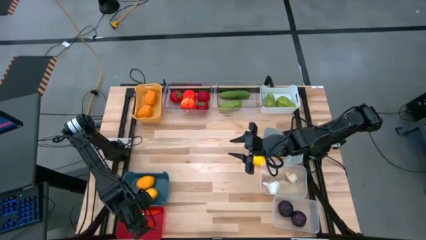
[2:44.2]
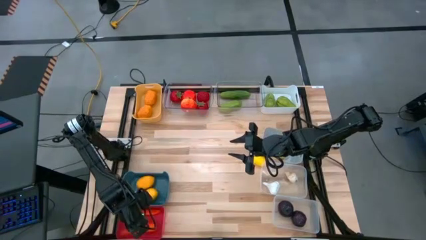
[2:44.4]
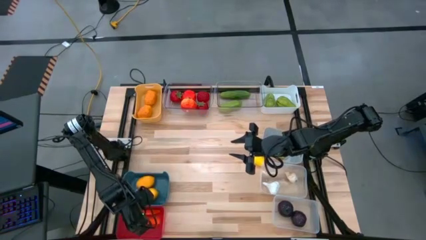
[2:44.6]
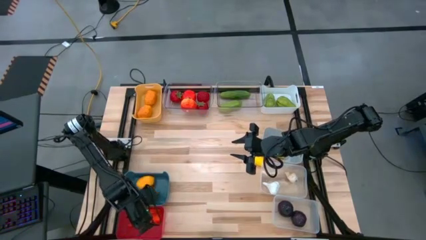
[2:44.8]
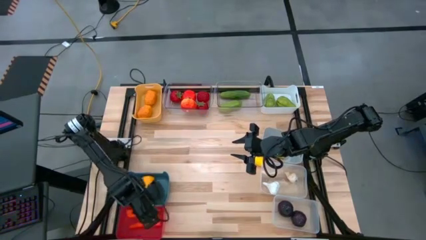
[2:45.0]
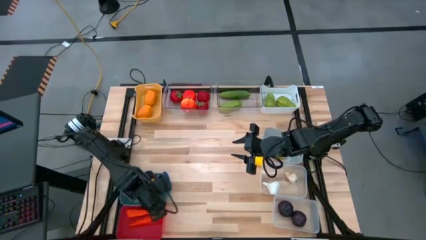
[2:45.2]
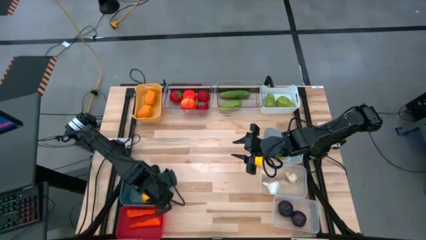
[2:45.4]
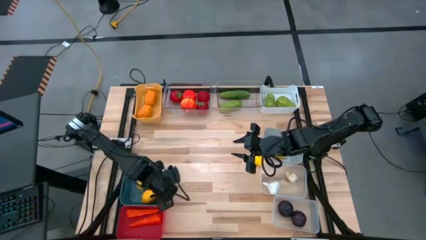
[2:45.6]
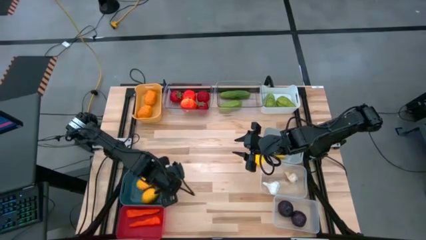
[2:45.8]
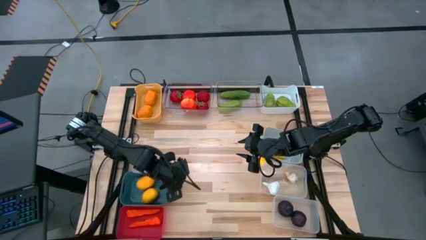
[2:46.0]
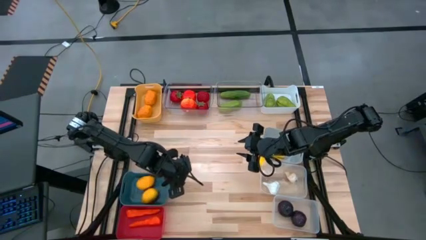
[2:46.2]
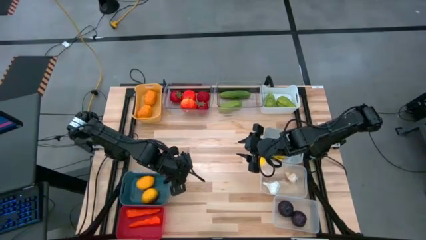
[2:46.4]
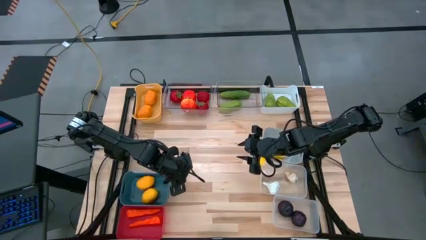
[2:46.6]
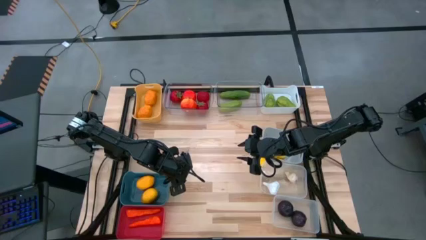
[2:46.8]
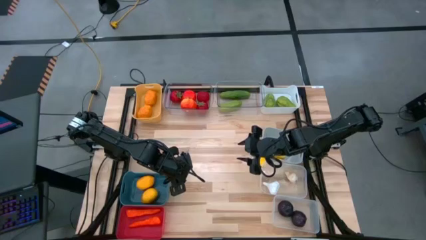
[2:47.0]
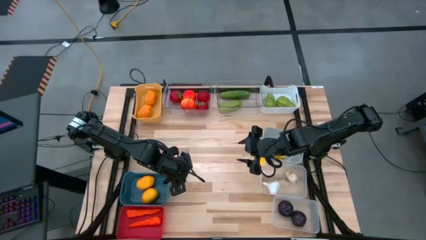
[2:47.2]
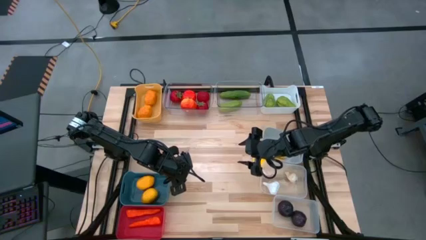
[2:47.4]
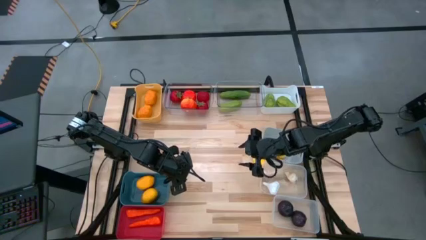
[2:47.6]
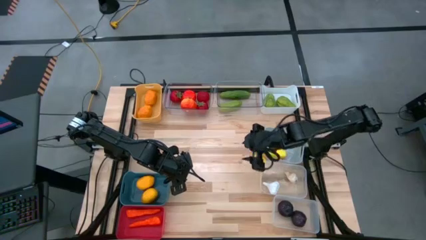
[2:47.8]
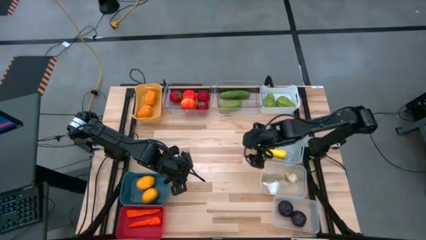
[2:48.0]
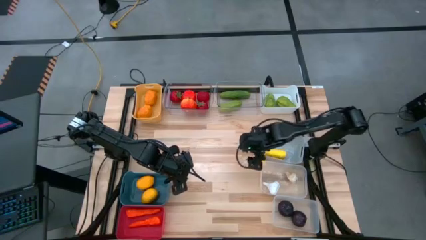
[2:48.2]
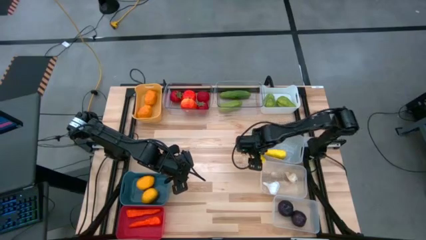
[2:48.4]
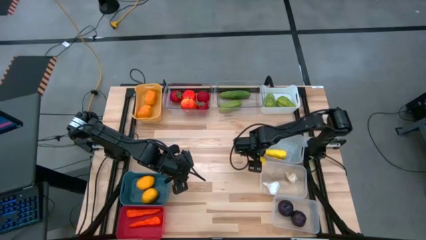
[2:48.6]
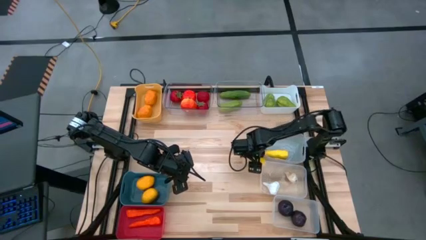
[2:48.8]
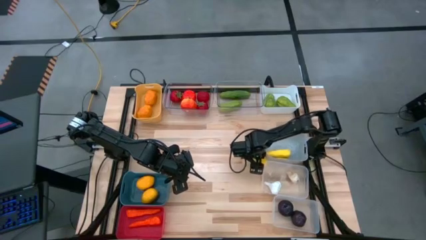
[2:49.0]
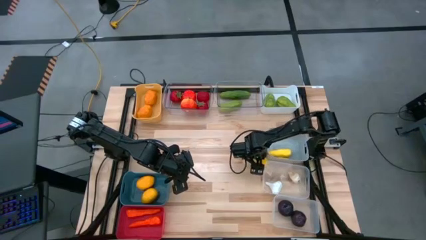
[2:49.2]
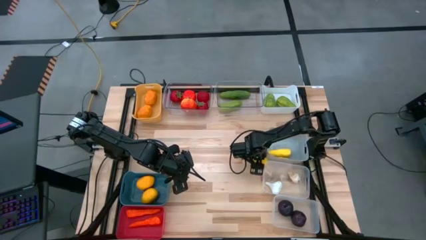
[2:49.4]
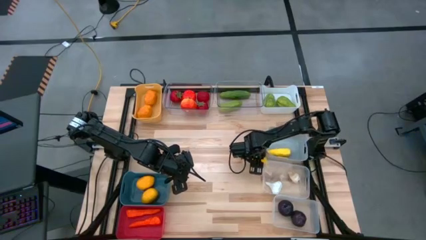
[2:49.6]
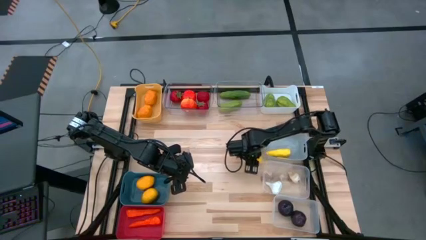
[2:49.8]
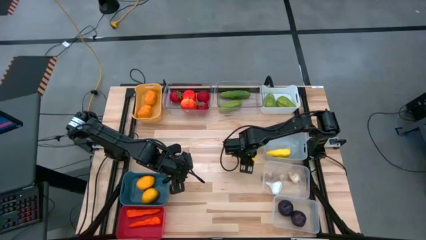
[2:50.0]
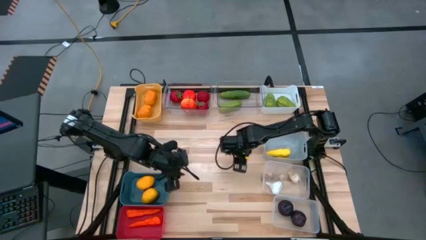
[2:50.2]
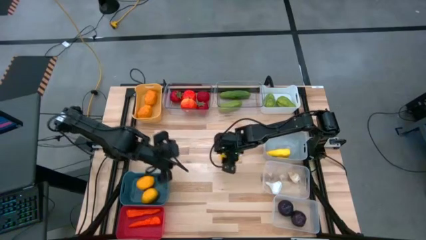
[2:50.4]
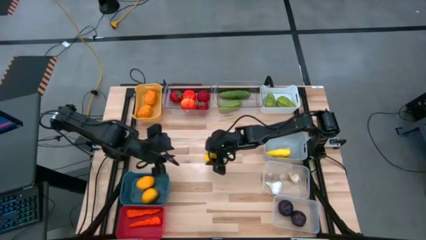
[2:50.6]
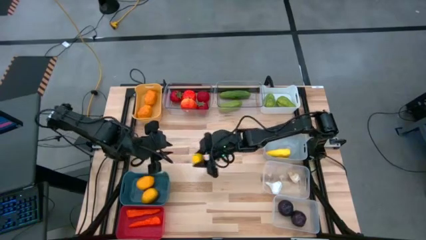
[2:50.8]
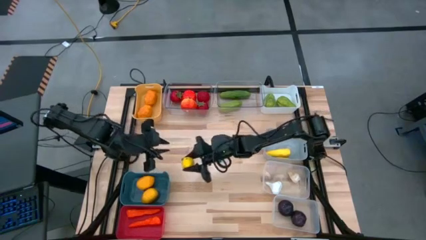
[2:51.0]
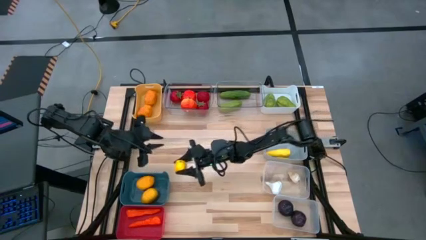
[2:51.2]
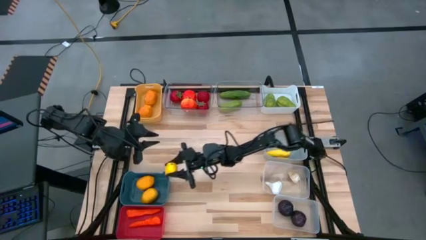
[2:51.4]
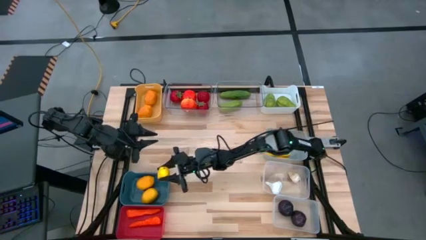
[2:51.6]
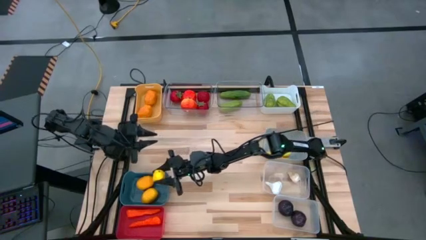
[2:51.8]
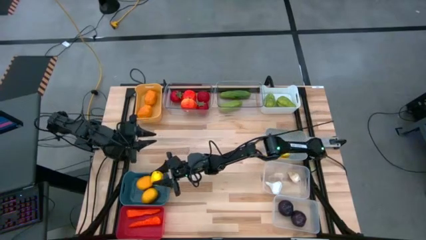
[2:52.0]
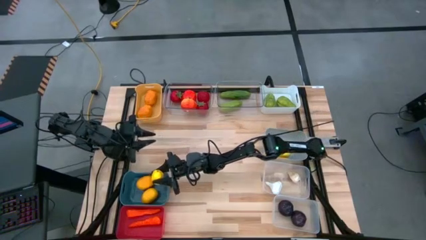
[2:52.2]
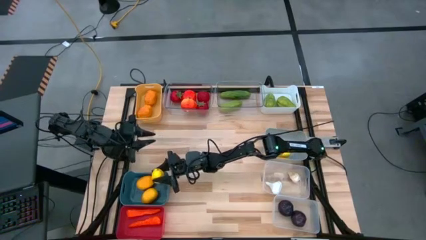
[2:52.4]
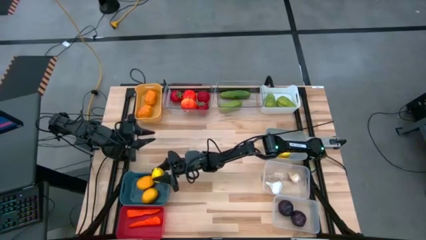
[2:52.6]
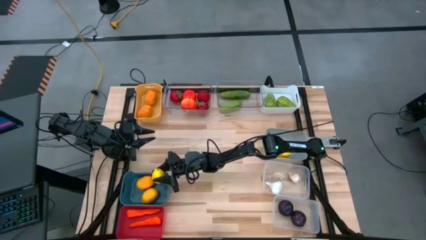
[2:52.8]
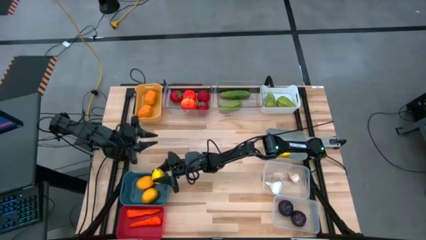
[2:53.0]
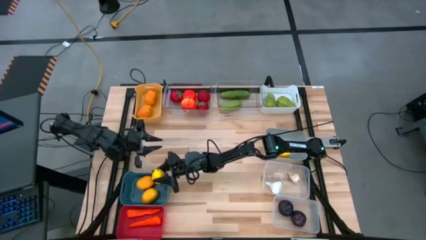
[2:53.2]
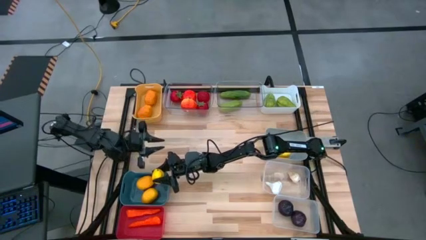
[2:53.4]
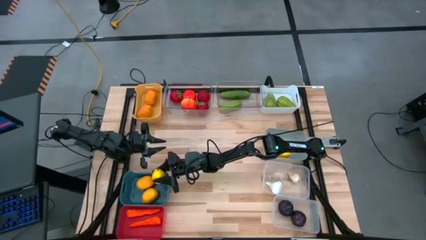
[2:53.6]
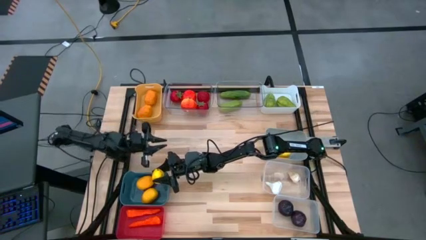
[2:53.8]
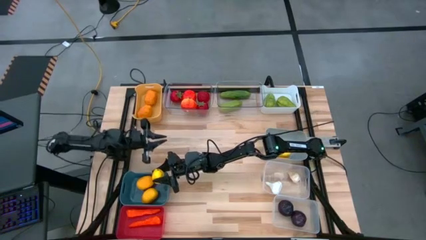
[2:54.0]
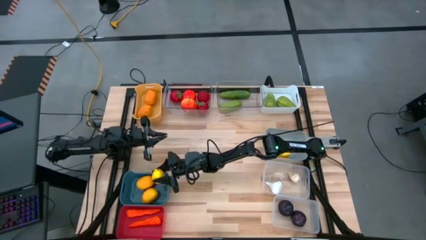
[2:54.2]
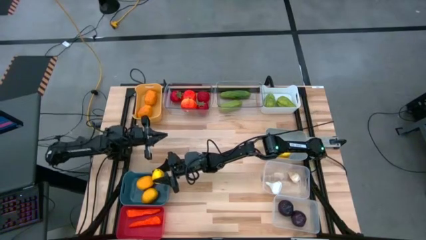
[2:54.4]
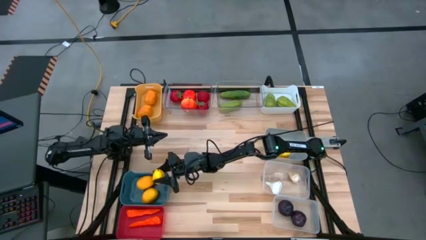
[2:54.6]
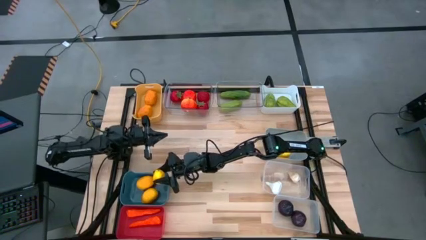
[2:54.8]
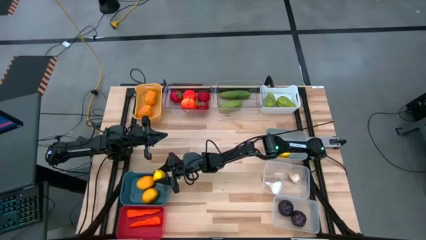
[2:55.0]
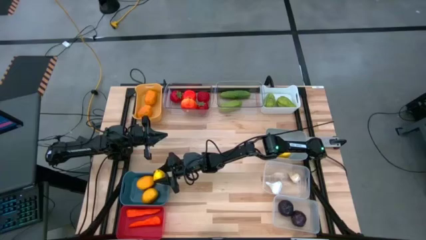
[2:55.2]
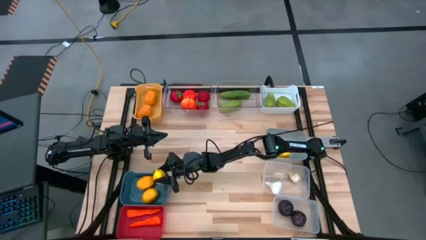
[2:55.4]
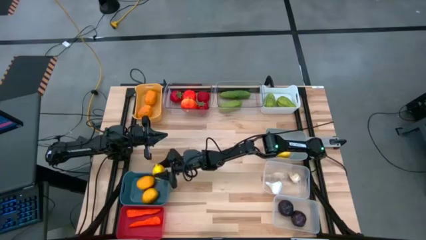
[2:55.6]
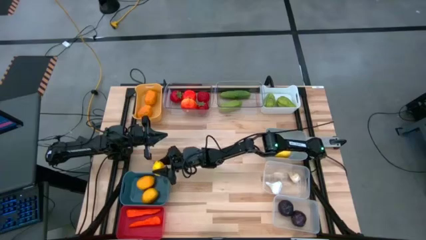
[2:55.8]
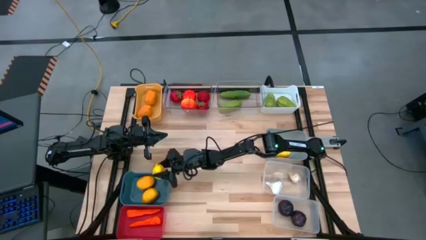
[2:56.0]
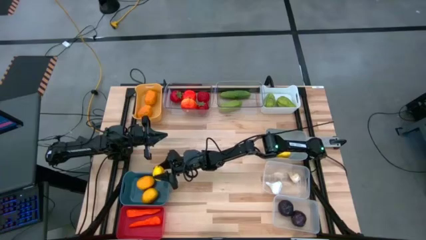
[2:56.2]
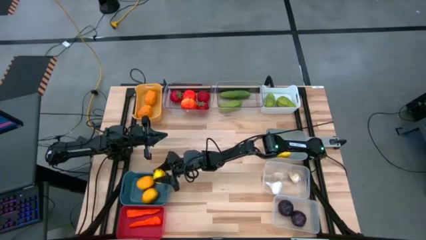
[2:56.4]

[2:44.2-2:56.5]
Task: Sort produce into baskets
Put the yellow lemon into the blue bin
